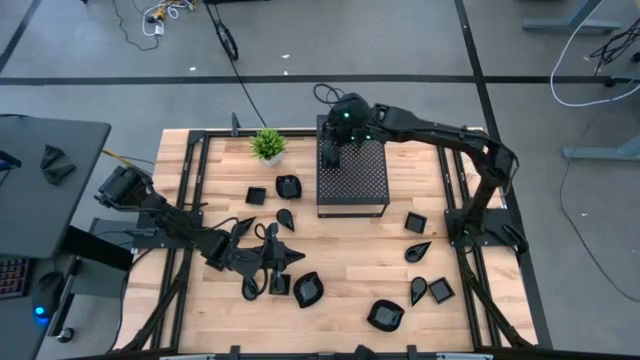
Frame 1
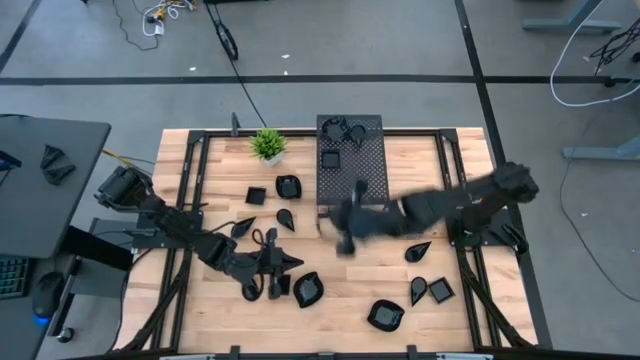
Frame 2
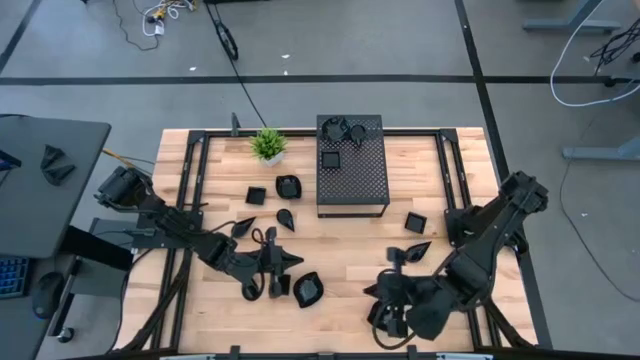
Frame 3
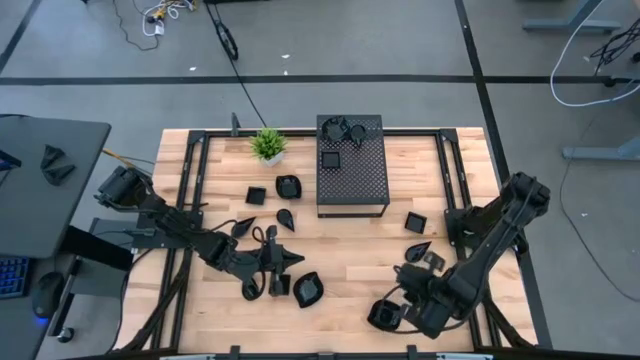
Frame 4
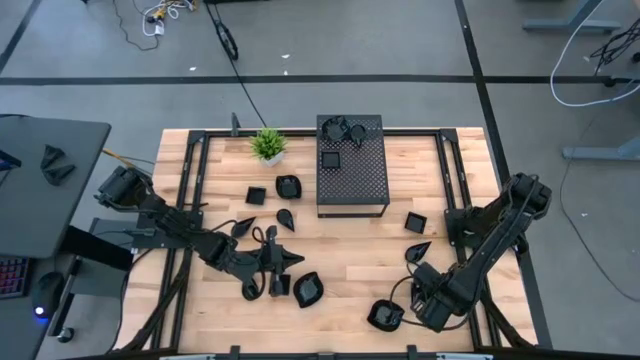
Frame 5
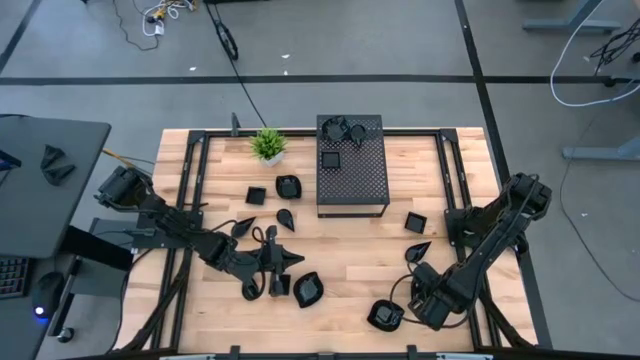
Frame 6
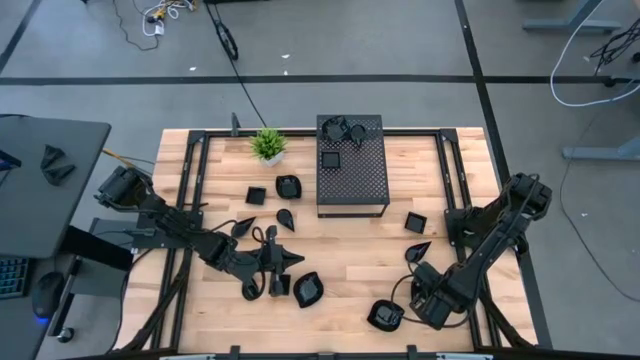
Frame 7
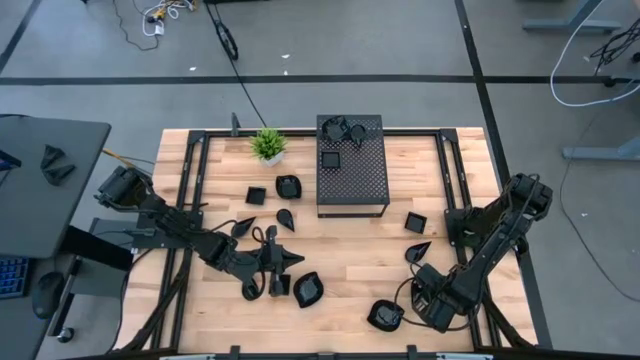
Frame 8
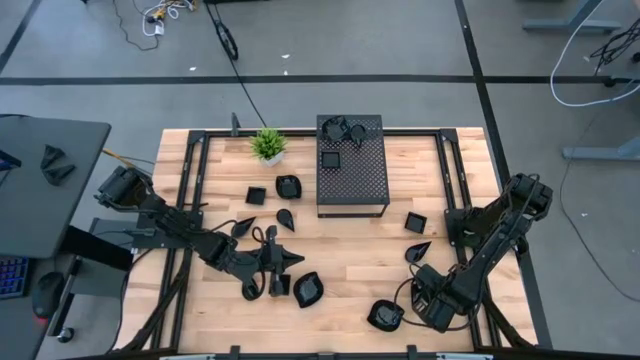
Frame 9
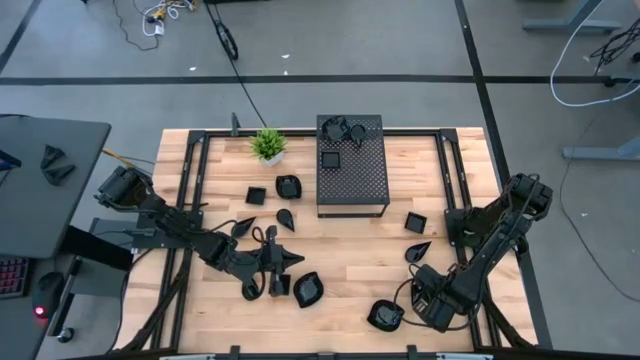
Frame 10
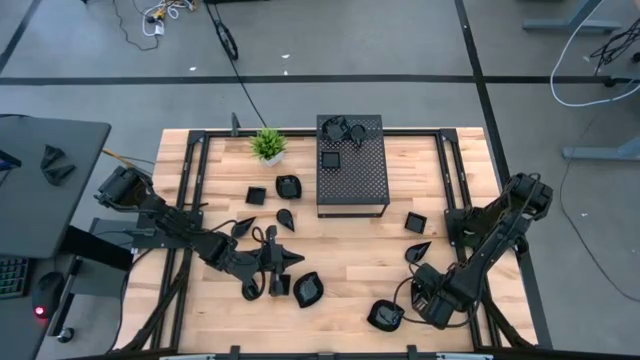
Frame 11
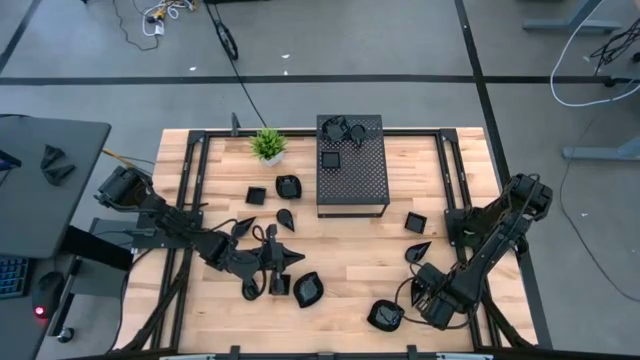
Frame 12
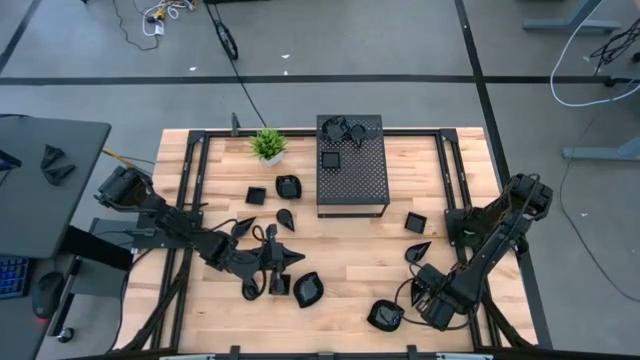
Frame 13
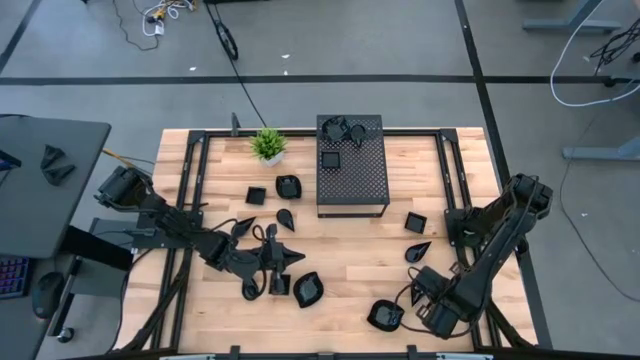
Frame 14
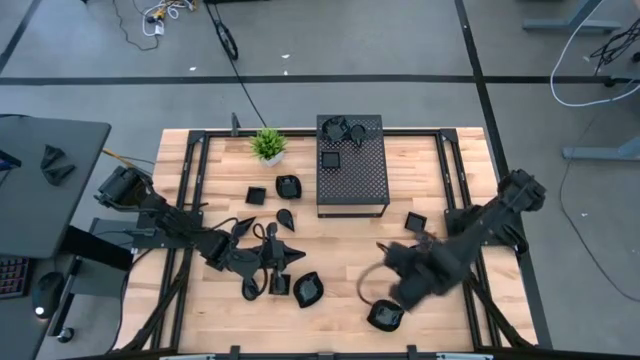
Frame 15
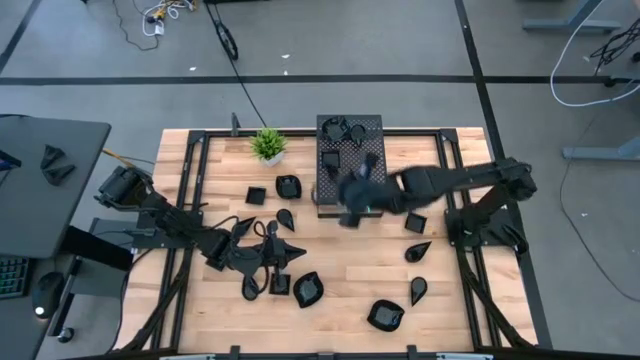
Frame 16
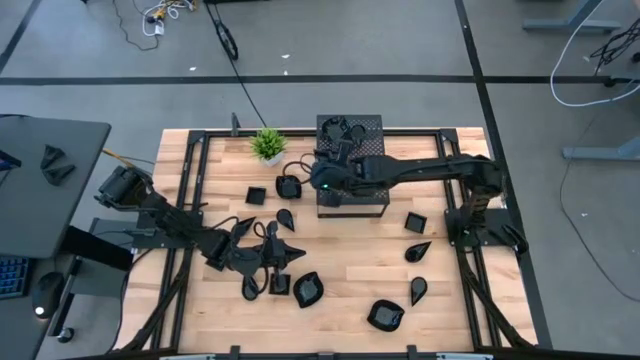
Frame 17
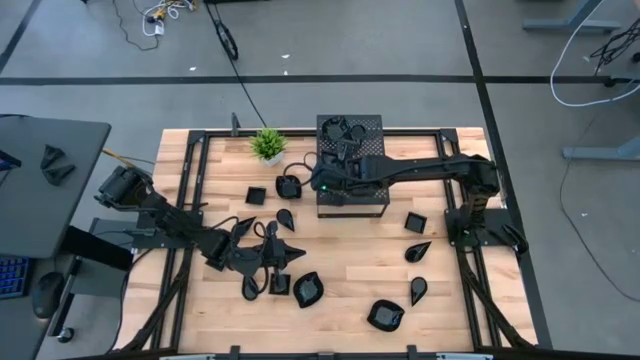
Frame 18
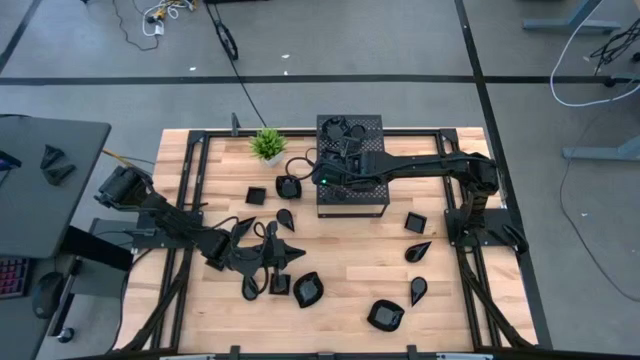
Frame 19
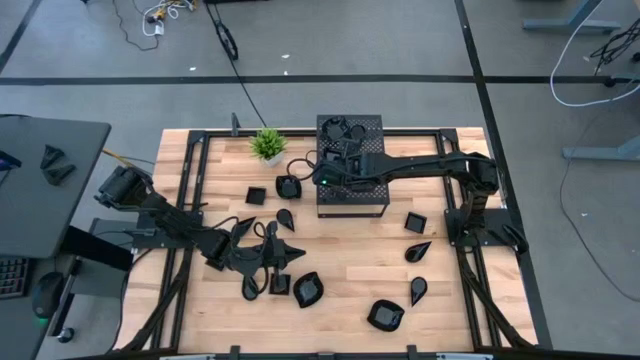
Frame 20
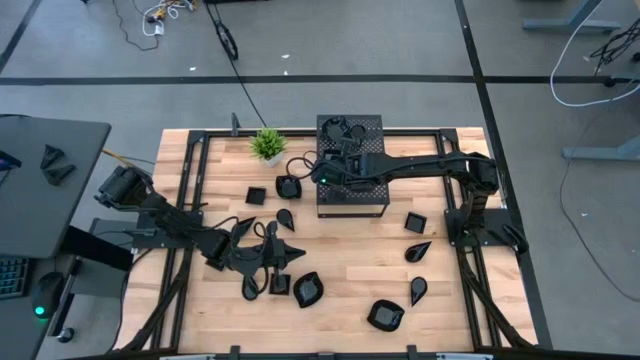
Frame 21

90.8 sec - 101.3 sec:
Task: Pick & Place Mini shaped plates
Stack the square plate on top of the square plates on the shelf

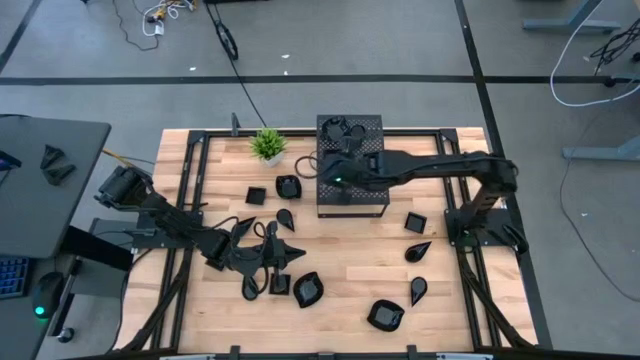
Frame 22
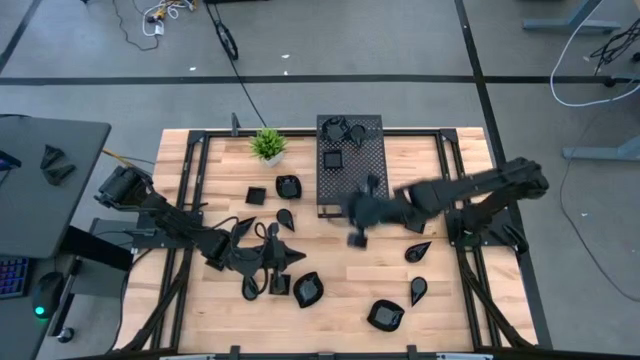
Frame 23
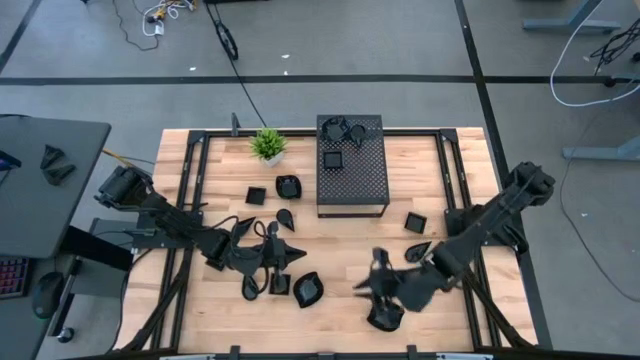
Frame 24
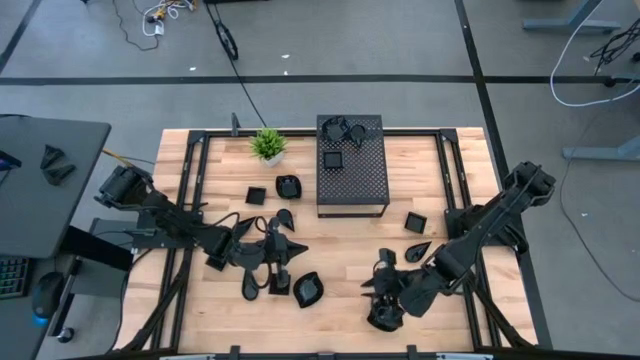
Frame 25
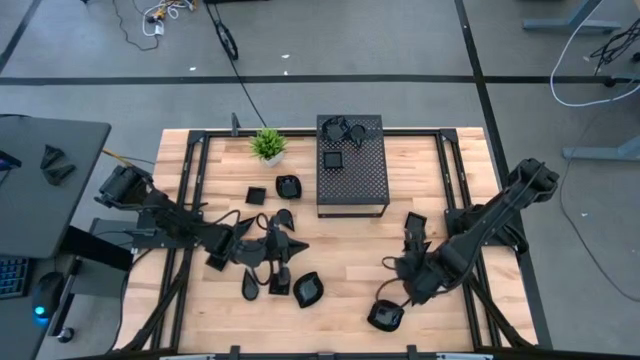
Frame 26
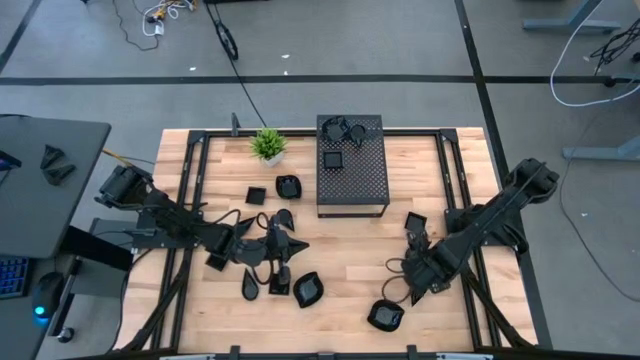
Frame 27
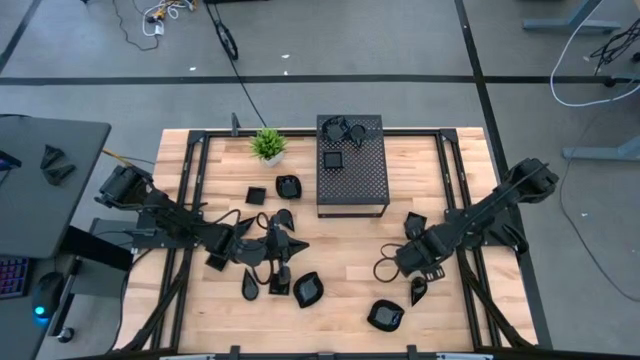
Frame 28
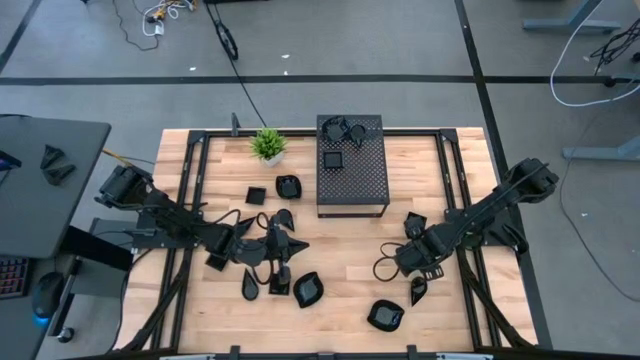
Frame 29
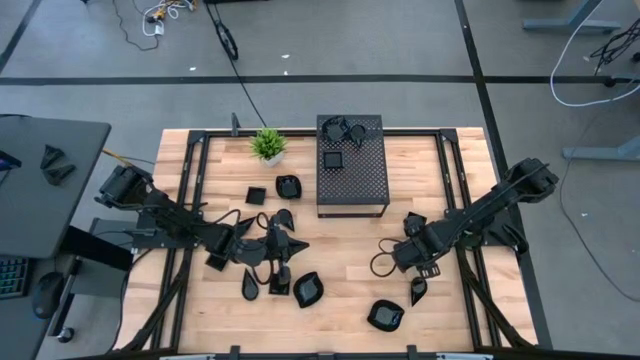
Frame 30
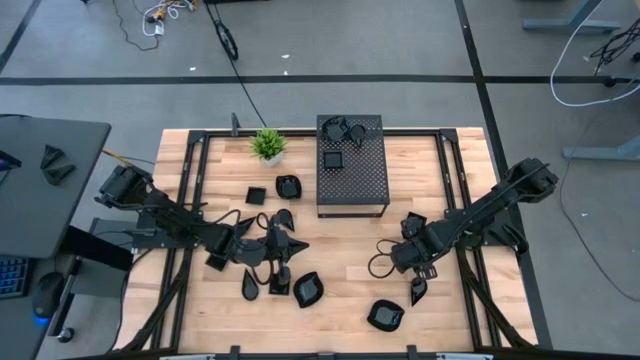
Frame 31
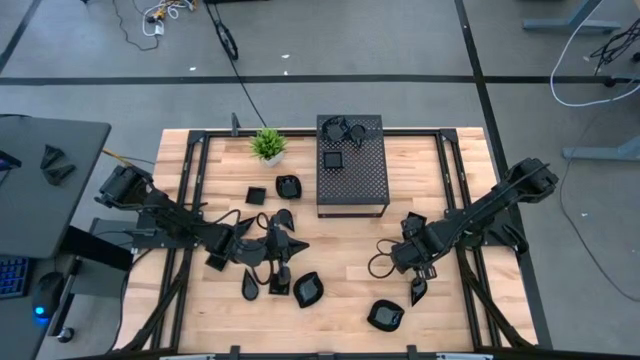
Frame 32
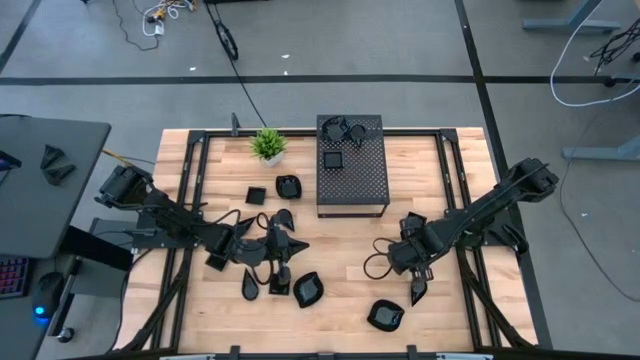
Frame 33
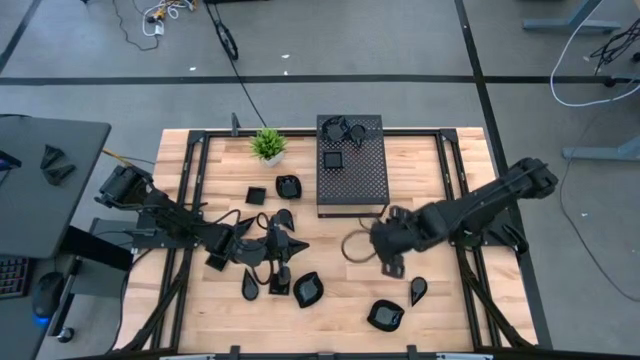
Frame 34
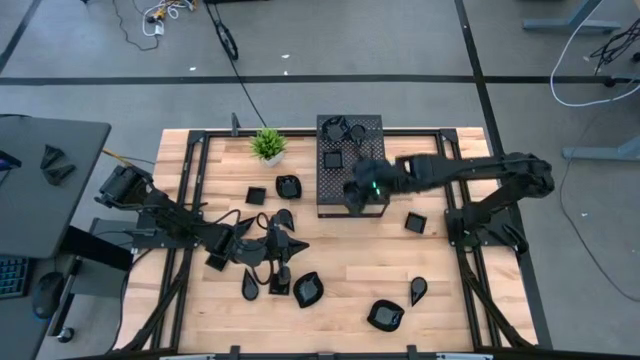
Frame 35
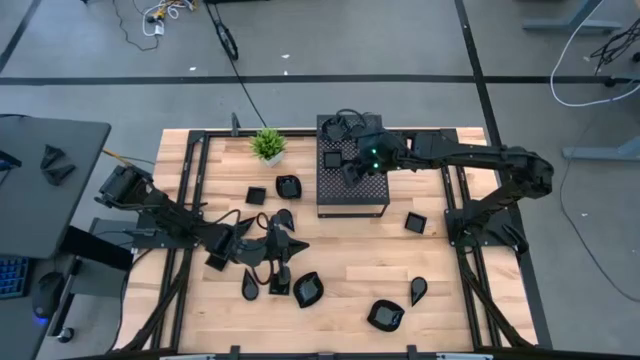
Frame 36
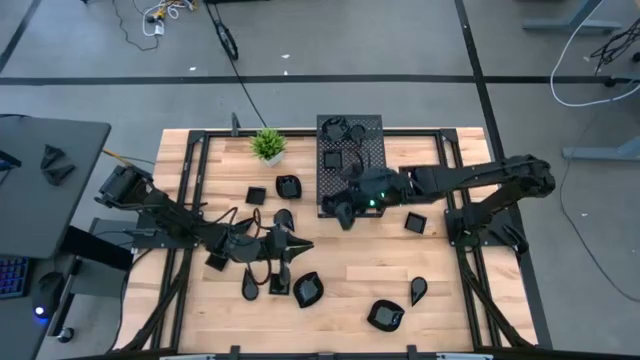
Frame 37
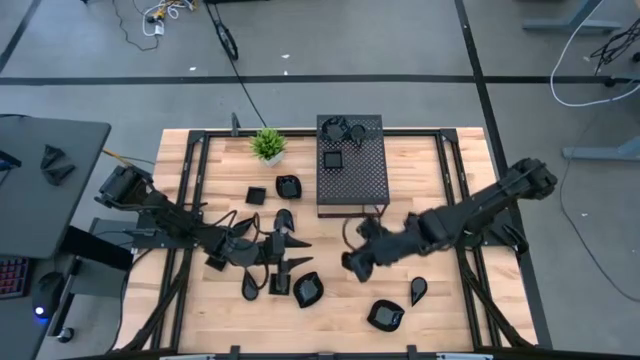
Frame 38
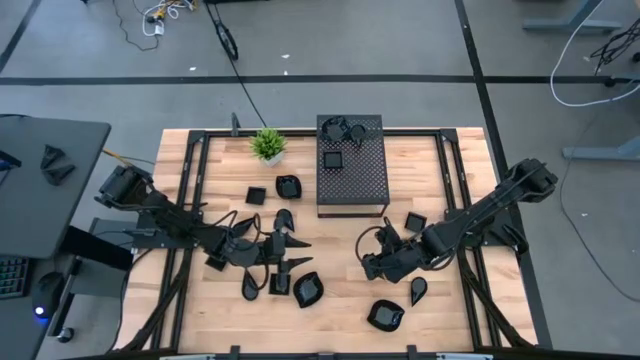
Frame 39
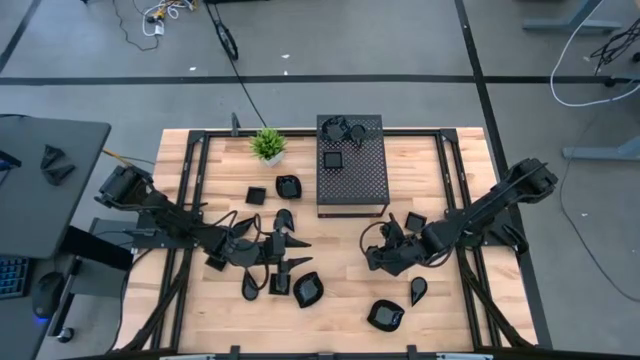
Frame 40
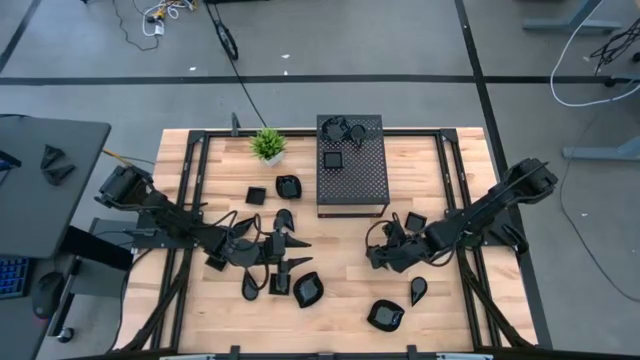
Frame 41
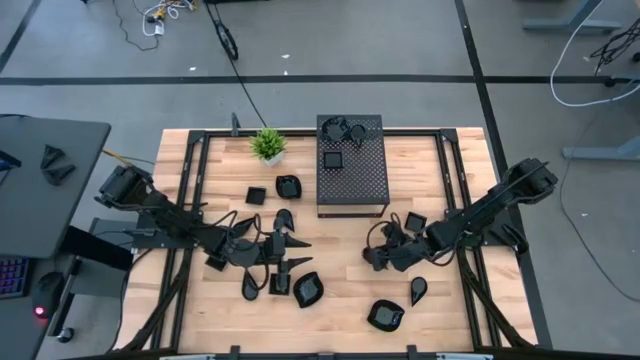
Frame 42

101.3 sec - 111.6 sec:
Stack the drop shaped plate on top of the drop shaped plates on the shelf
